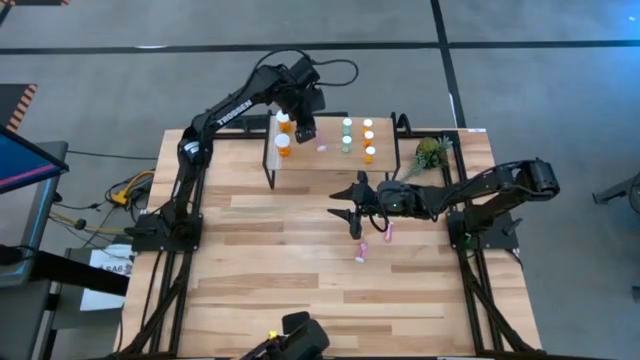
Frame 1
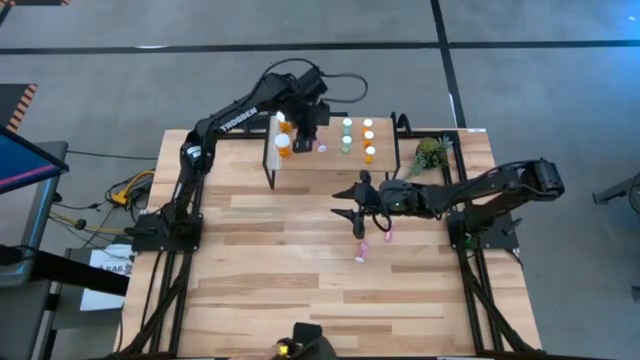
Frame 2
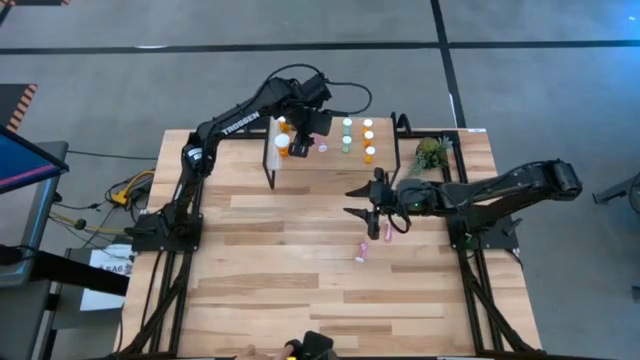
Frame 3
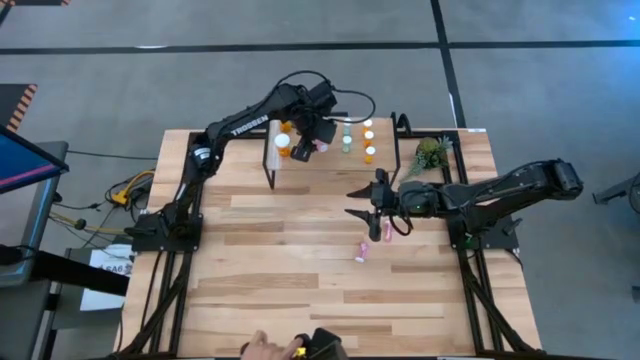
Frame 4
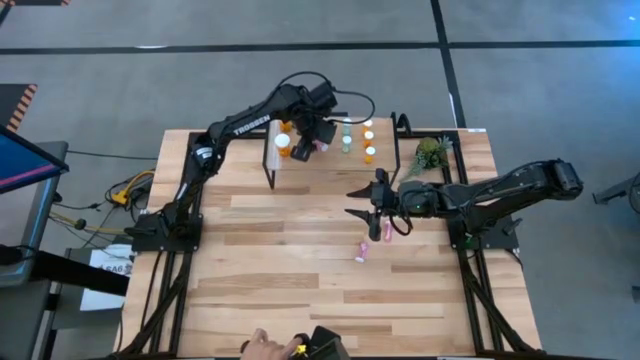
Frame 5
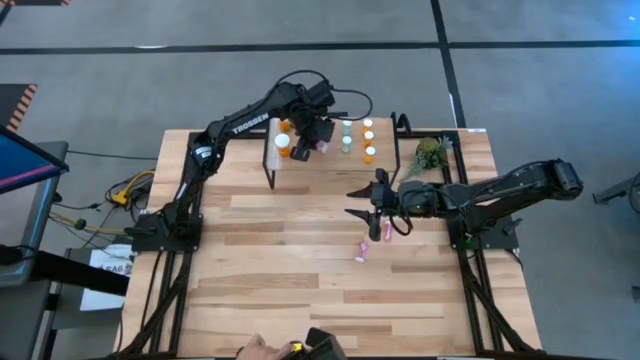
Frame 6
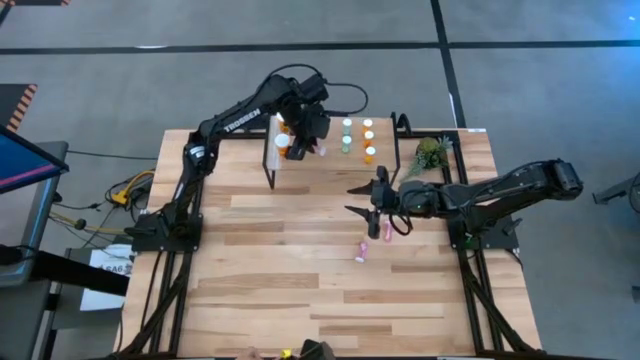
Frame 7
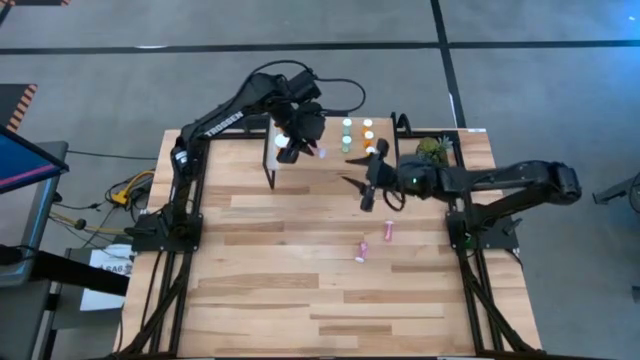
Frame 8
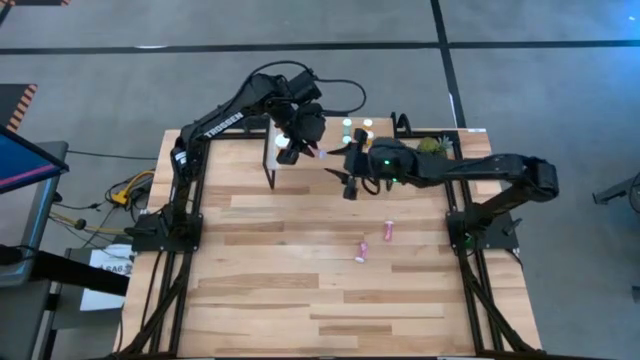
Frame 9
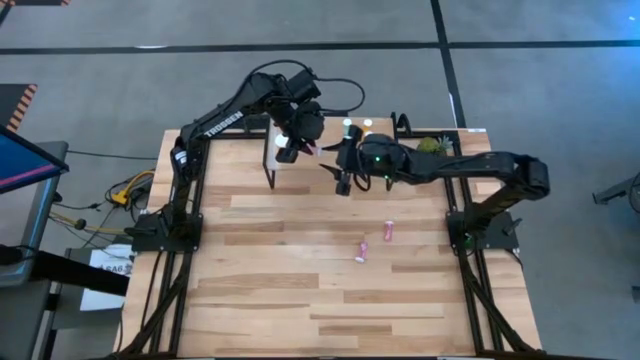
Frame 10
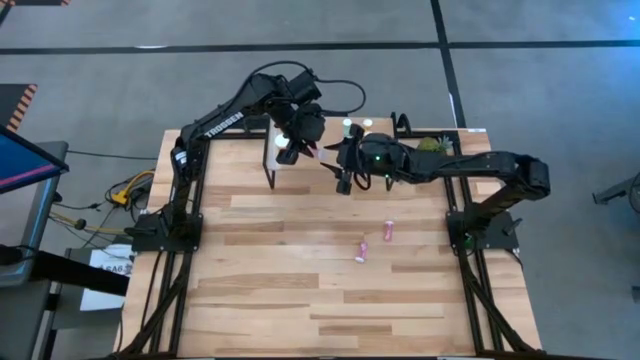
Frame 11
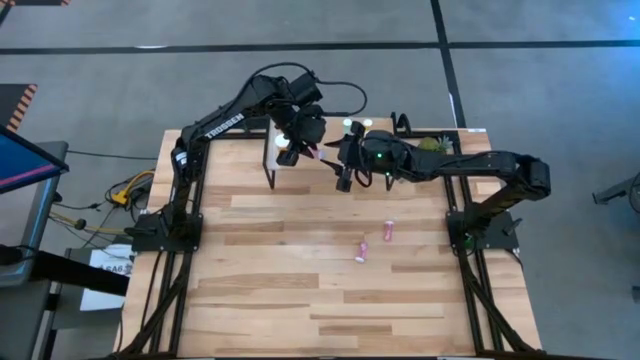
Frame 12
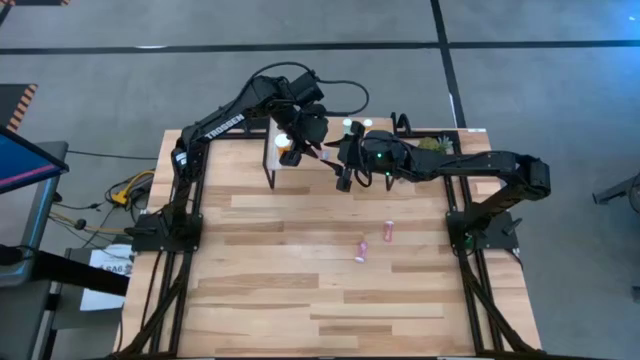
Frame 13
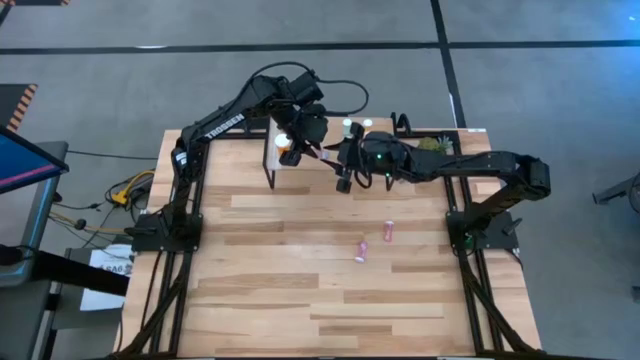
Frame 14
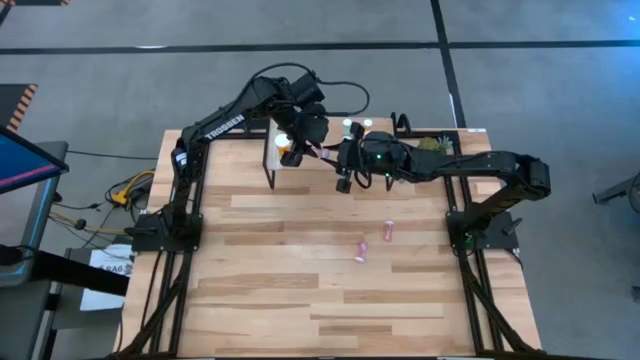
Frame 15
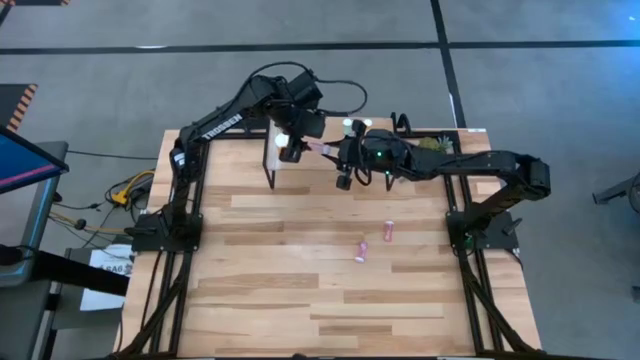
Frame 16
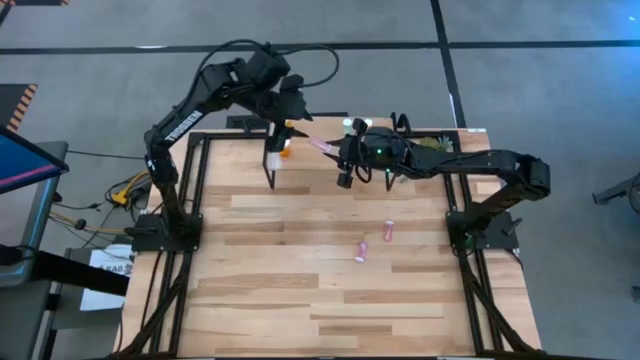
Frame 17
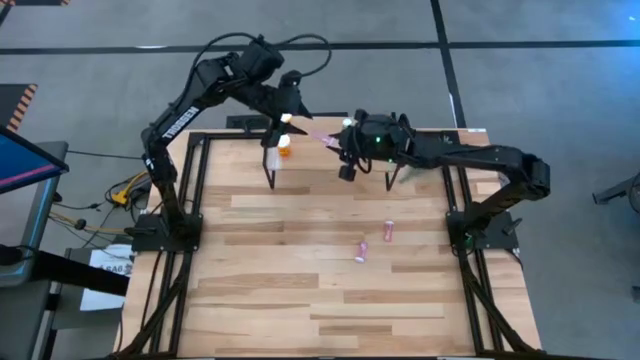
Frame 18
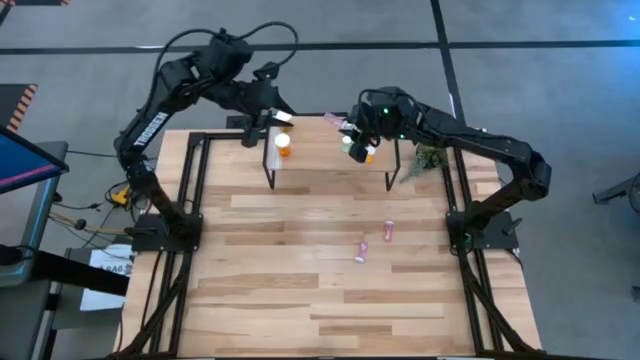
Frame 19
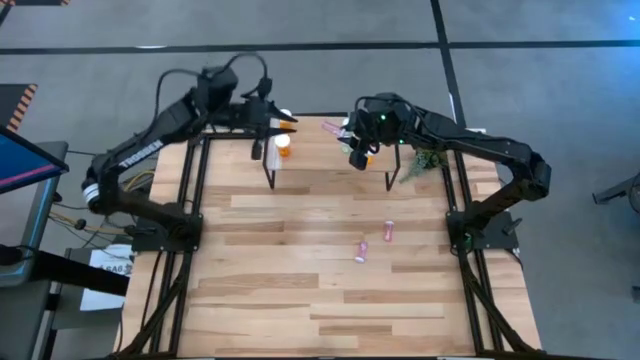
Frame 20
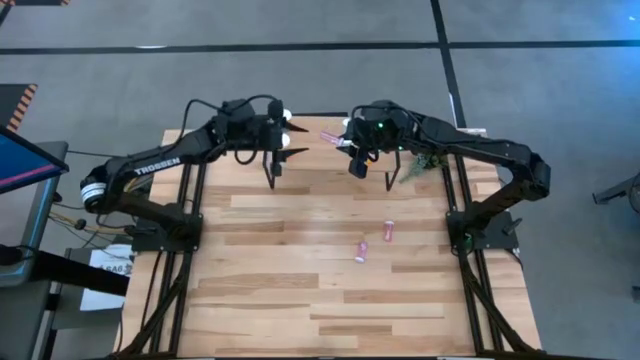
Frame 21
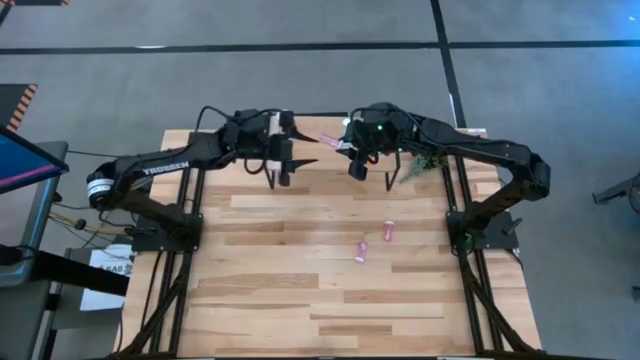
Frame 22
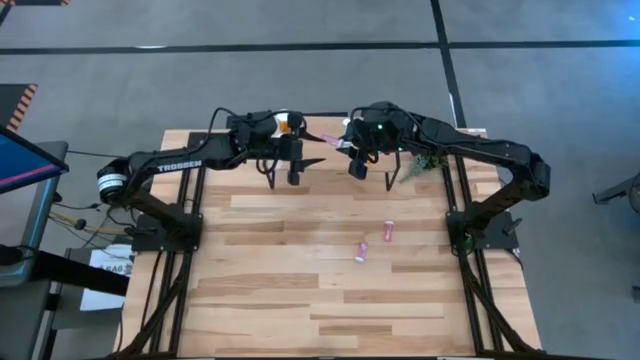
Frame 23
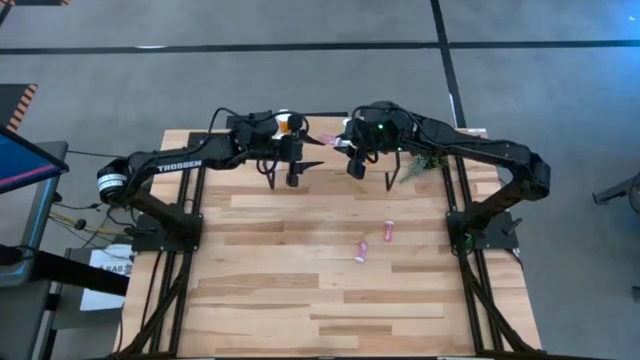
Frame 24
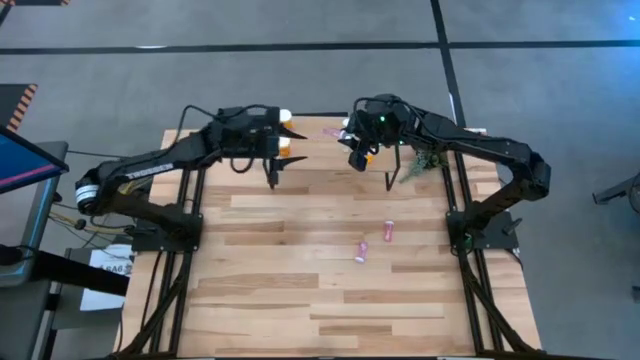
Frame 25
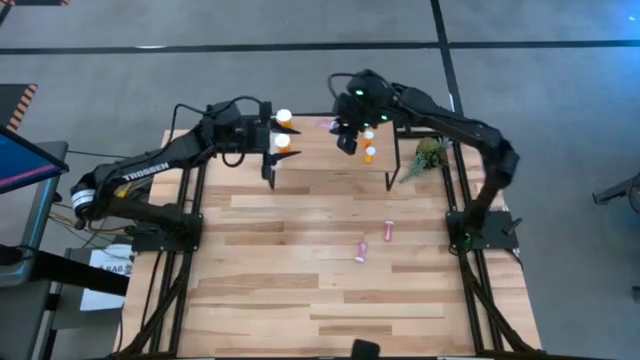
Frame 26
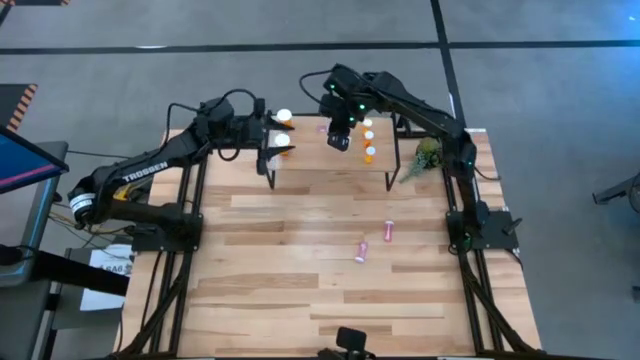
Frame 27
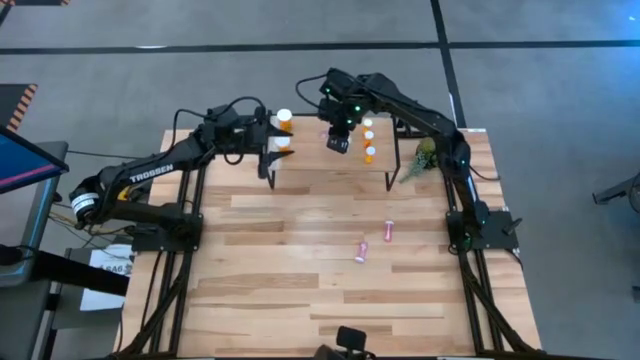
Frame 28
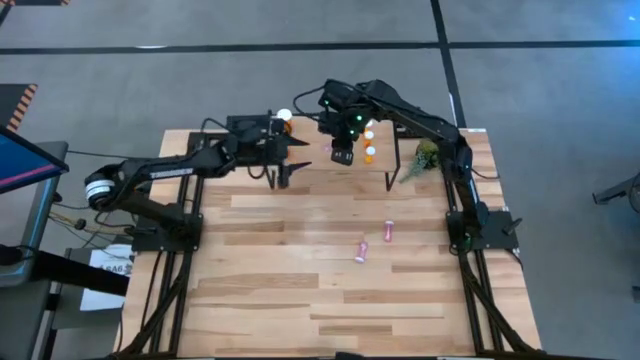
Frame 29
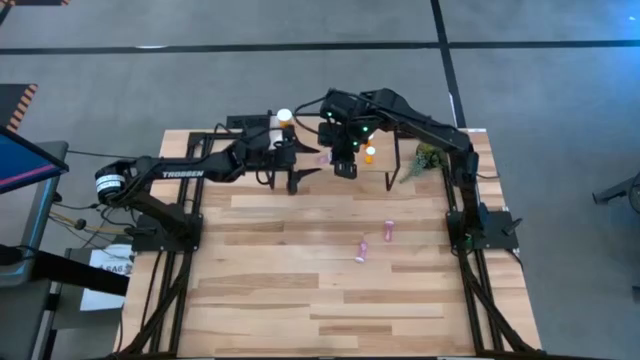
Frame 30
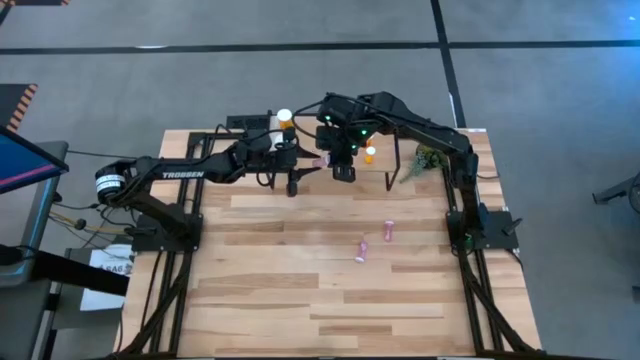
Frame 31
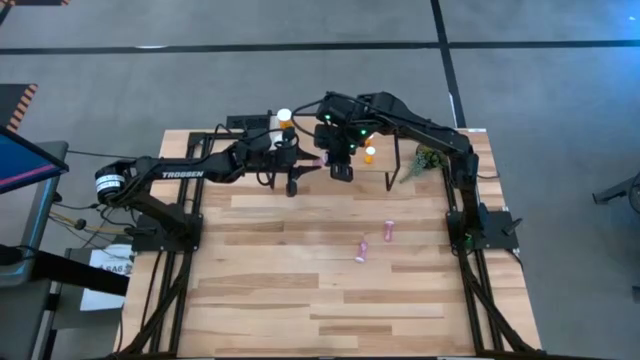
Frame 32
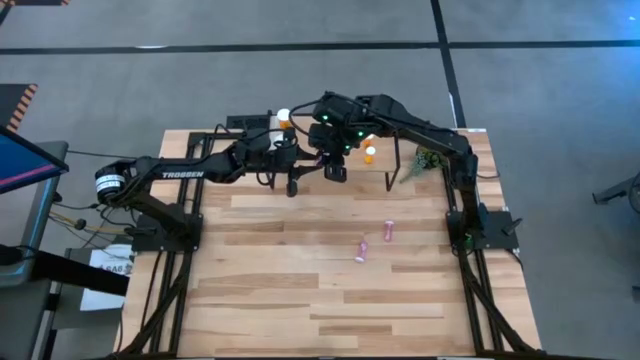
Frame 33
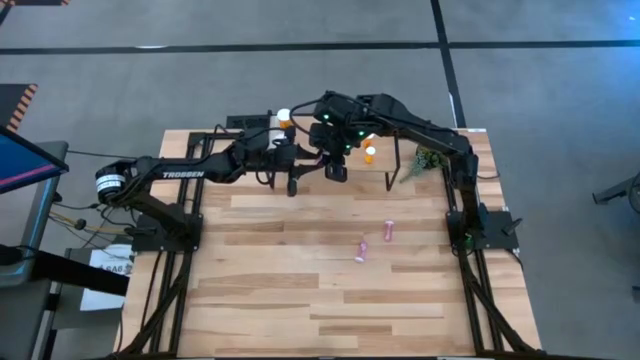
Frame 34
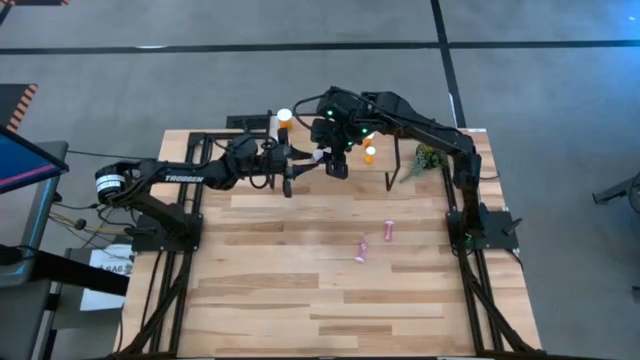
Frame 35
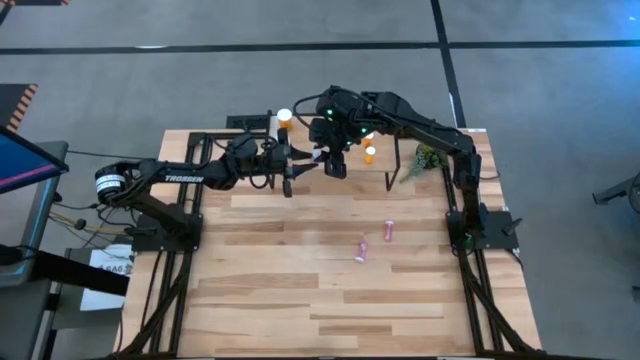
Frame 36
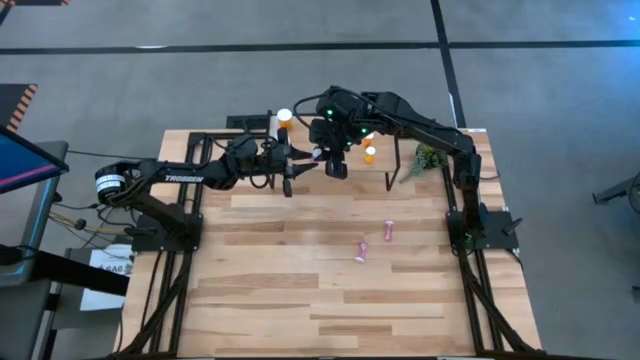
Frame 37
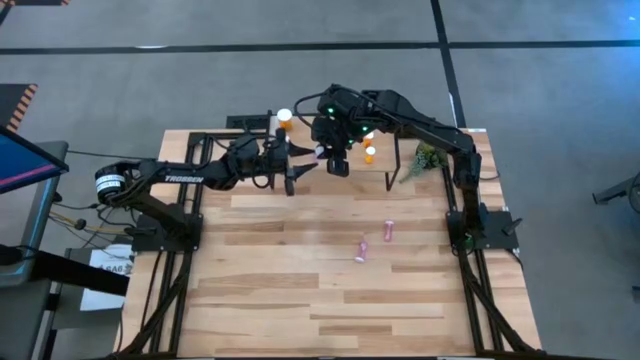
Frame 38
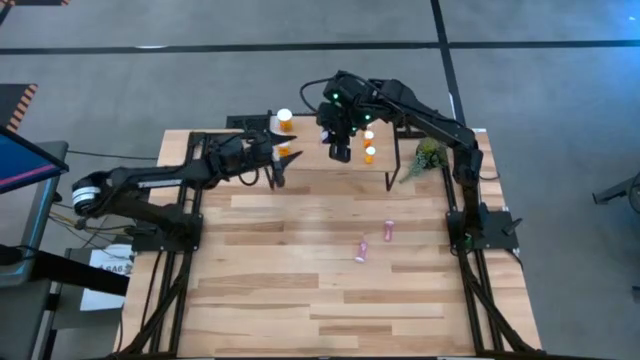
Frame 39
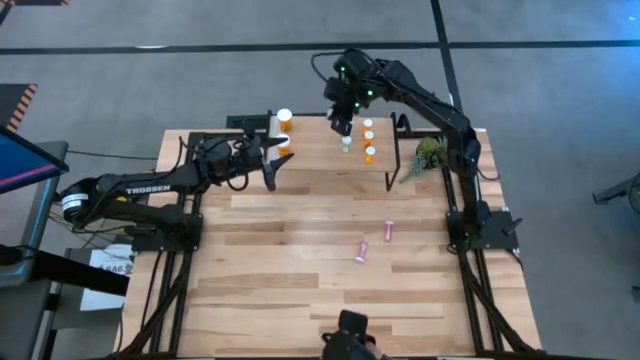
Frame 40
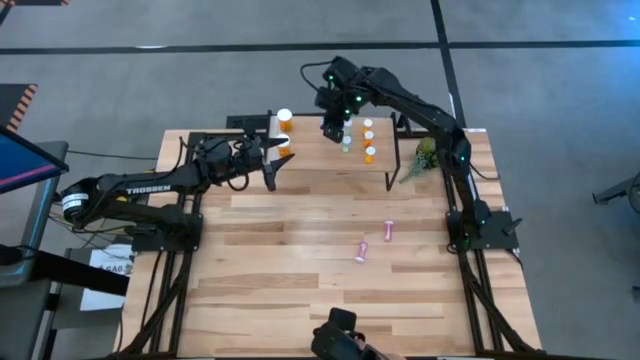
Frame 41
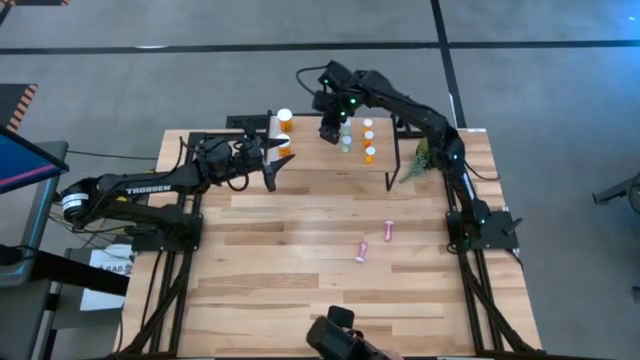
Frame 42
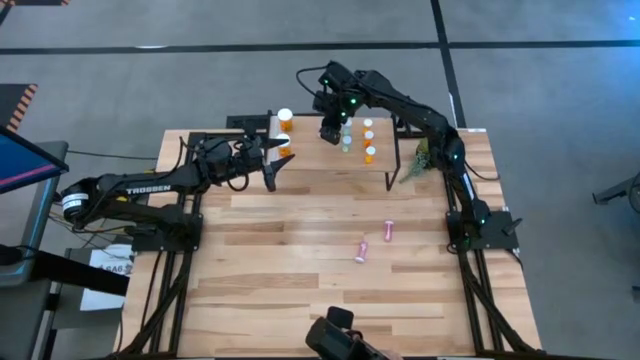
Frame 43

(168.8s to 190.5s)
Task: Pick and place medicine bottles onto shelf by color
Put the bottom right pink pill bottle on the shelf

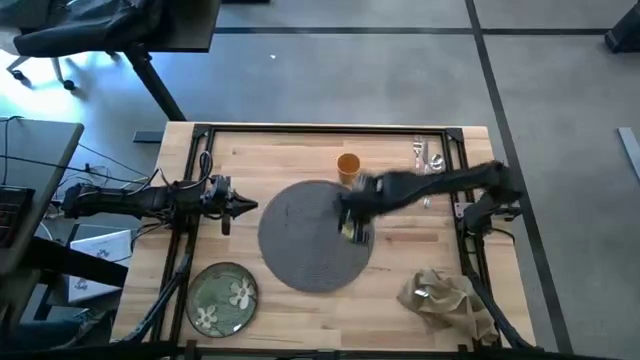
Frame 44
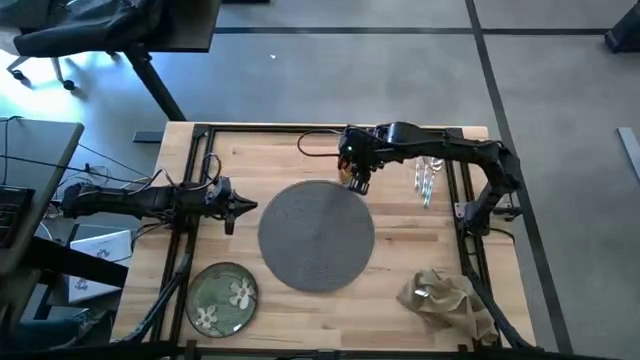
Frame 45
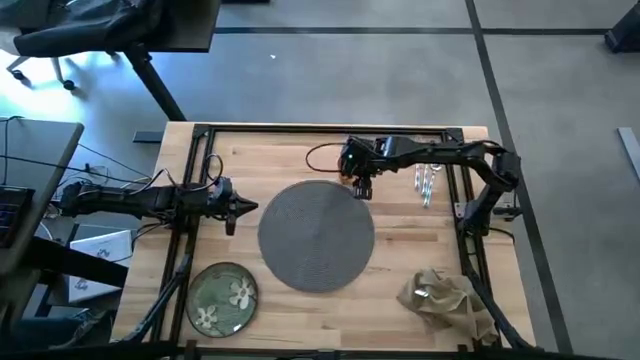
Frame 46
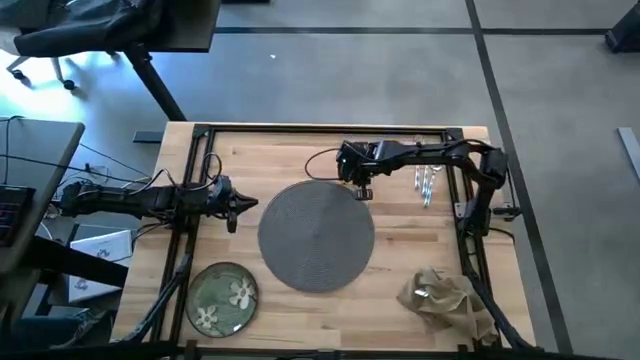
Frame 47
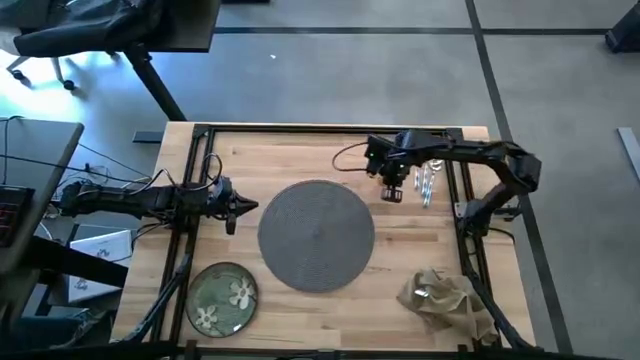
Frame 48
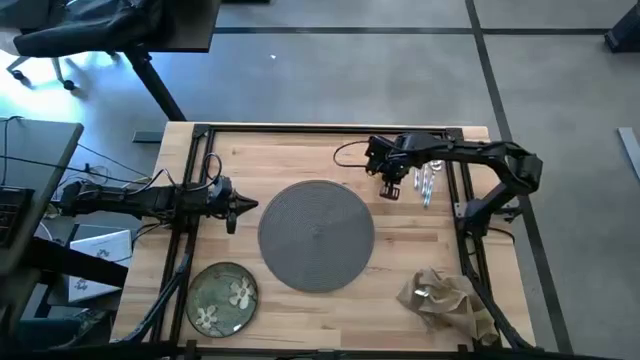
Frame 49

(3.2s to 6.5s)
Task: Set table place
Move the yellow cup to the top right of the table
